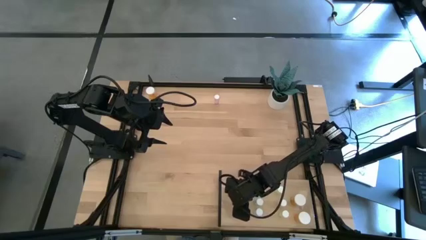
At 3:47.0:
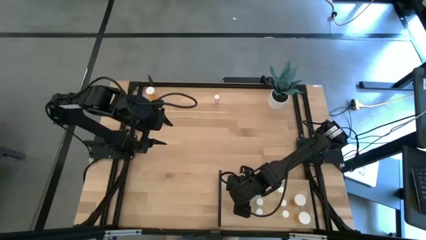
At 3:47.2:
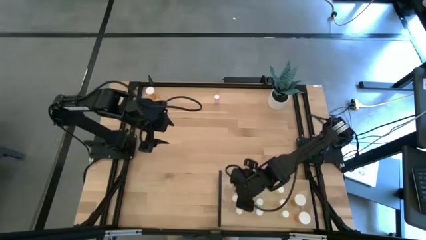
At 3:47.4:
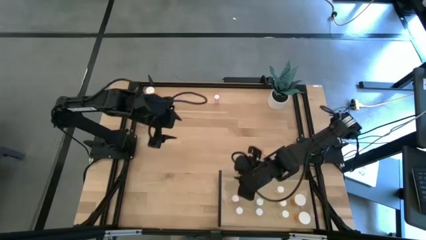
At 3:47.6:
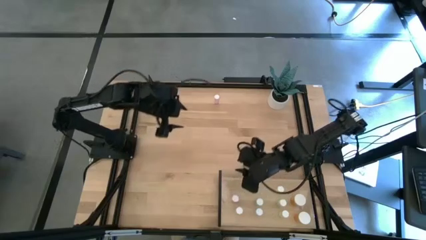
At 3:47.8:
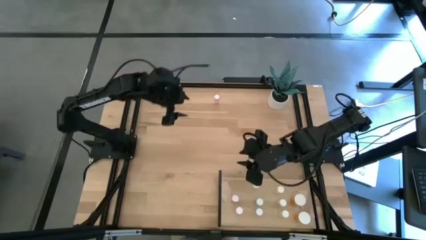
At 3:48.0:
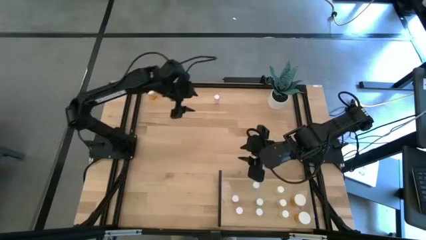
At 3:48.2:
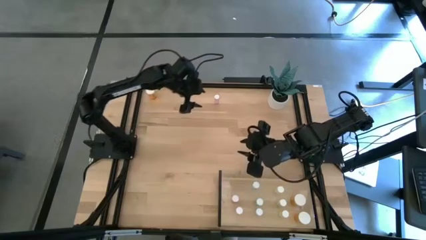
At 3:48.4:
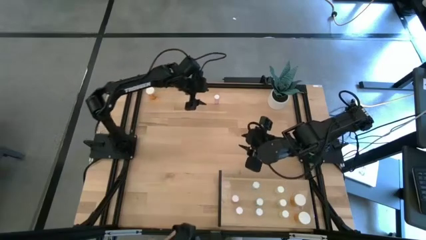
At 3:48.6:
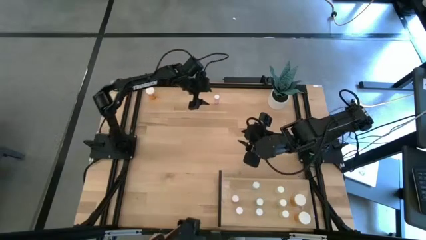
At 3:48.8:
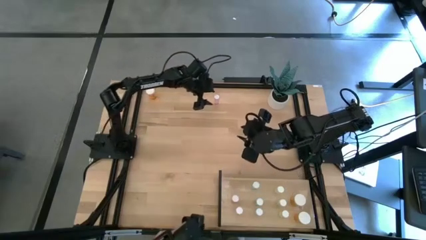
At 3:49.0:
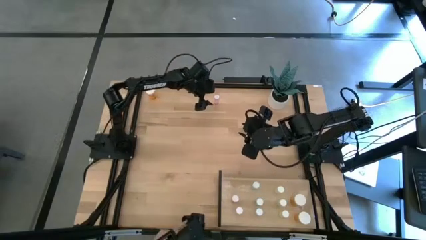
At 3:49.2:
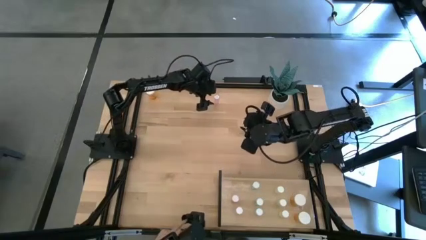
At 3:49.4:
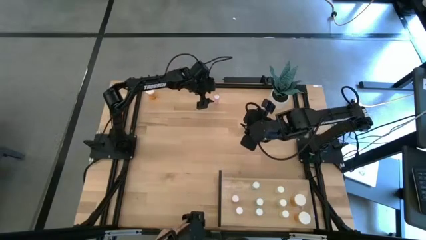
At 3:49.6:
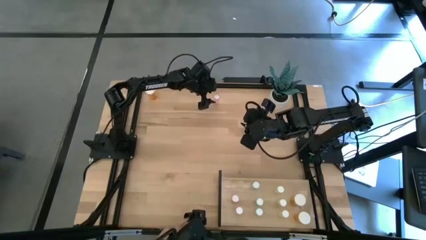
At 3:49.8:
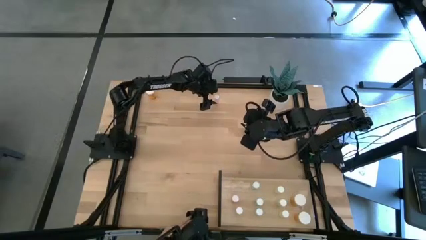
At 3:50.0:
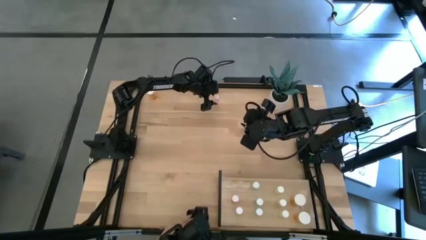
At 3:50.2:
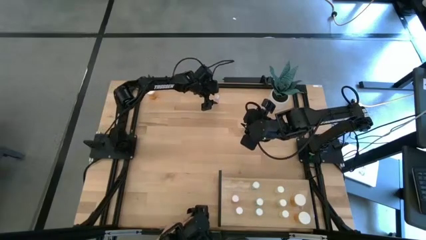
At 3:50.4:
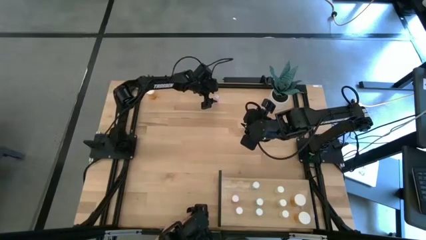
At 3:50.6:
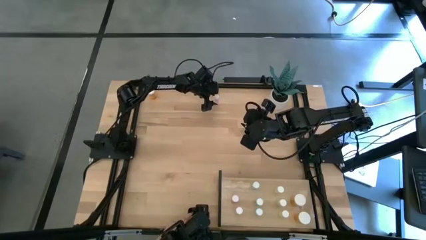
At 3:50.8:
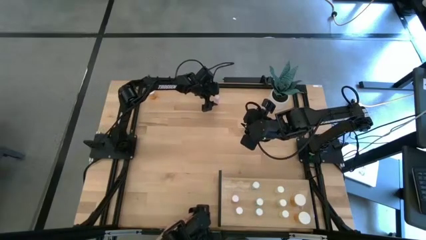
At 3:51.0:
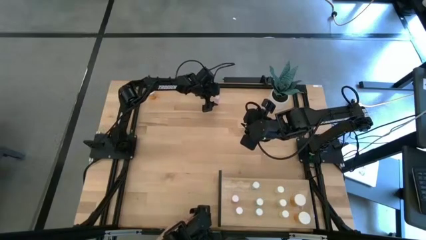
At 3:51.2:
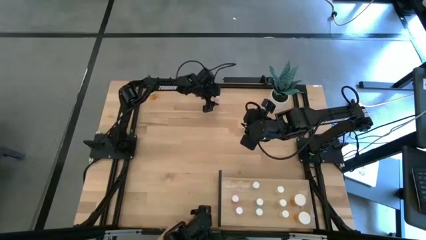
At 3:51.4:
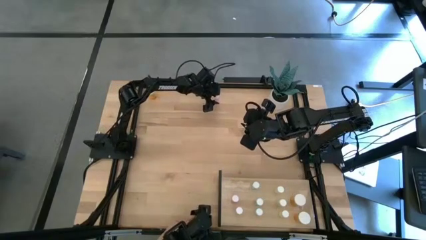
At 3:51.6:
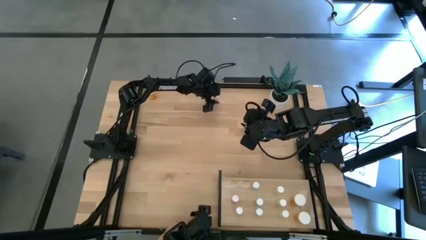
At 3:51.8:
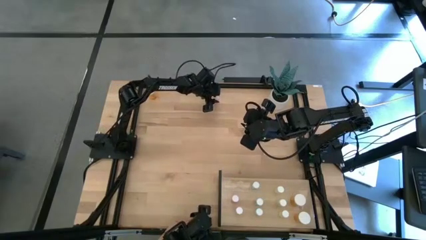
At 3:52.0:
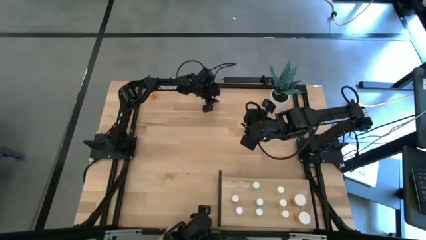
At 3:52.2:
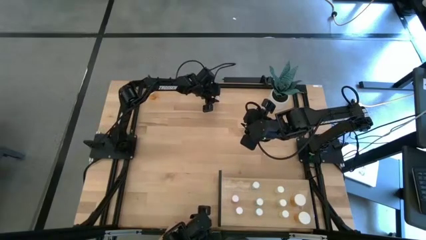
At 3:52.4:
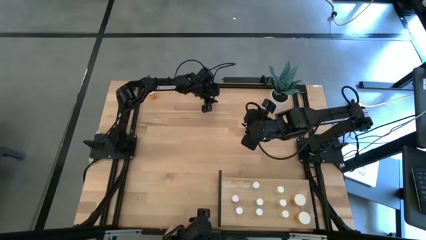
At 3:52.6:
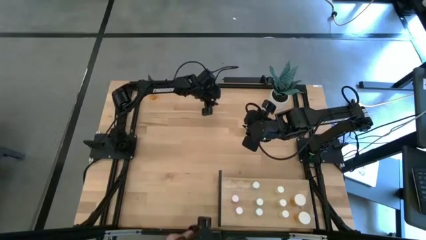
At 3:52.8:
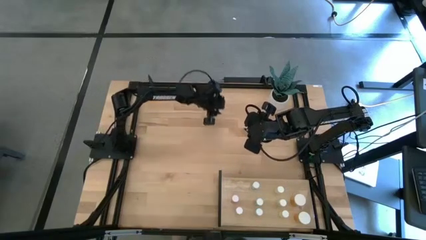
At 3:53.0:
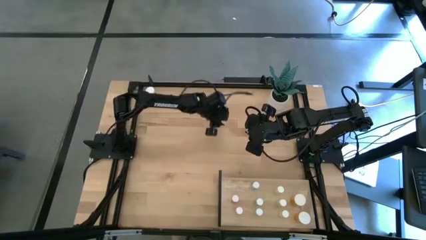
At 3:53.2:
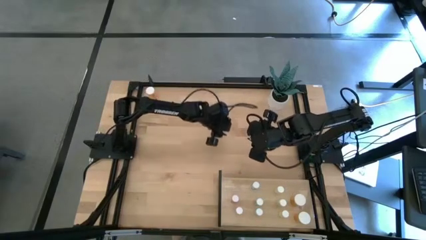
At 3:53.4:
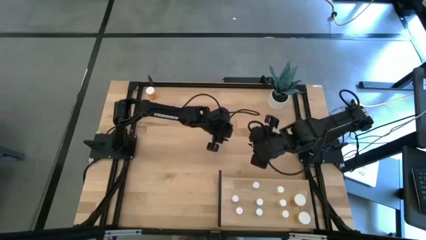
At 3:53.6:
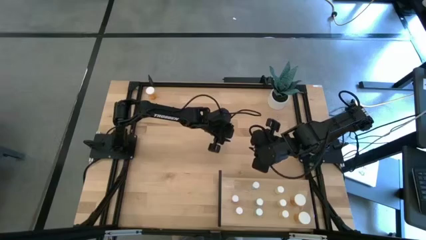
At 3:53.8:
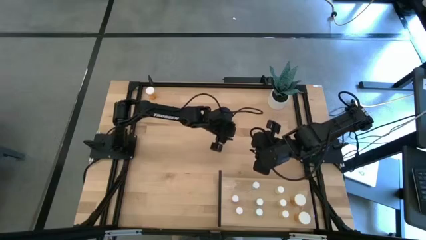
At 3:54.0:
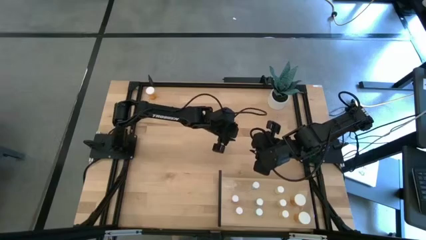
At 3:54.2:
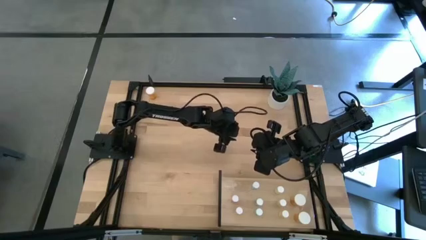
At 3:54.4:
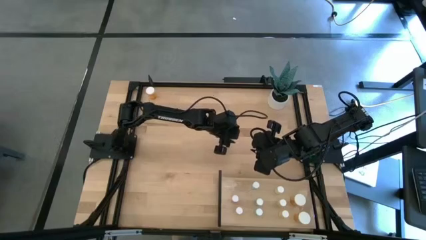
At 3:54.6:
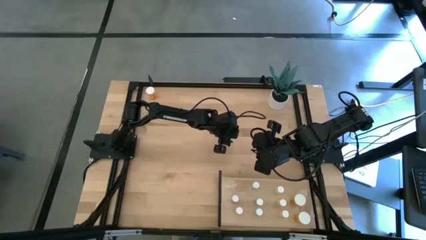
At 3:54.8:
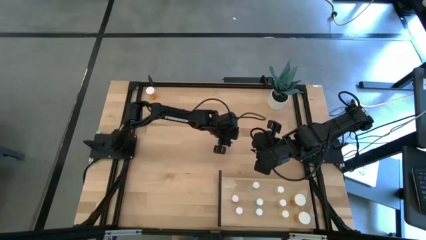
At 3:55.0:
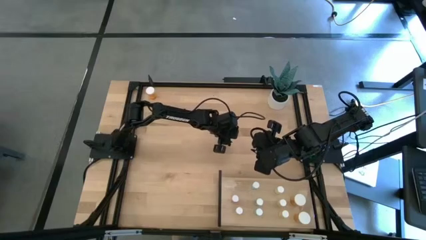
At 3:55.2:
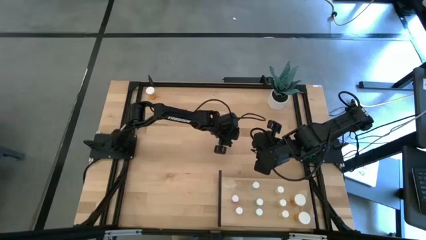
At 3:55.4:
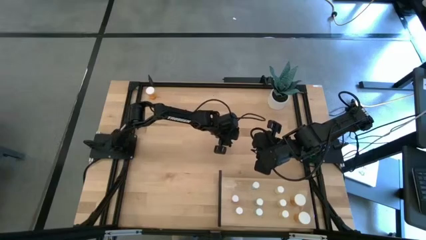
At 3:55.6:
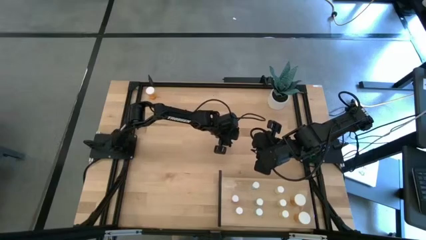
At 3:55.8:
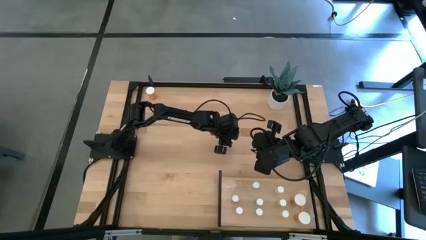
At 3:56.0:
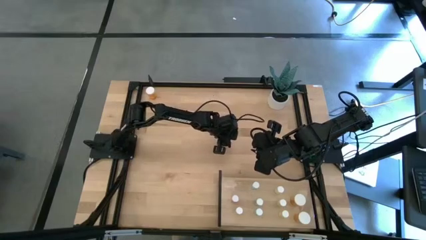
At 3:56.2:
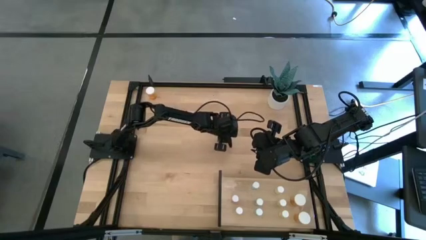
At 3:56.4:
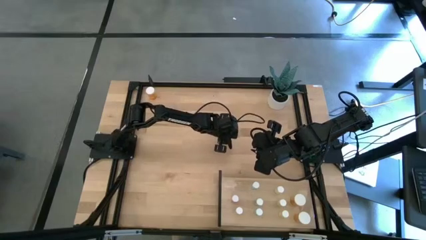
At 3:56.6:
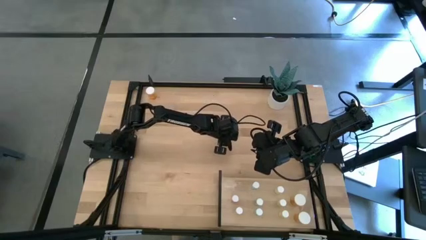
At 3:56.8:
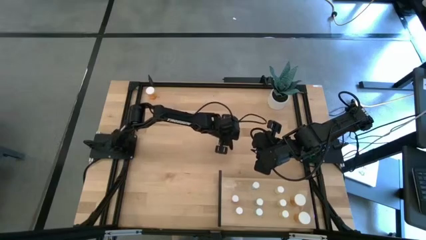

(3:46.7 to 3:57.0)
Task: Pick and place medicine bottles onto shelf by color
Put the pink pill bottle on the shelf aligned with the other pink pill bottle

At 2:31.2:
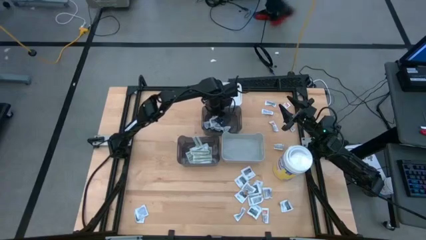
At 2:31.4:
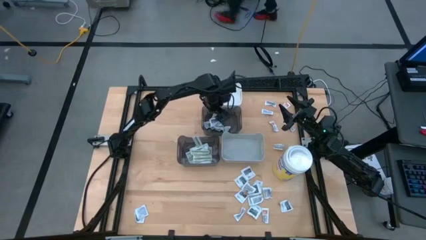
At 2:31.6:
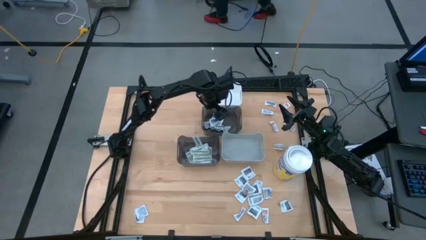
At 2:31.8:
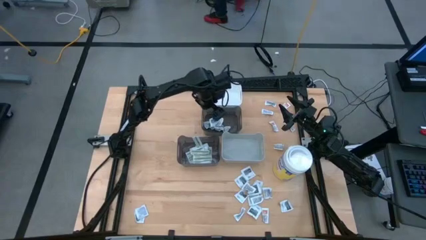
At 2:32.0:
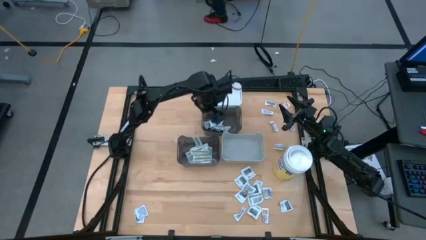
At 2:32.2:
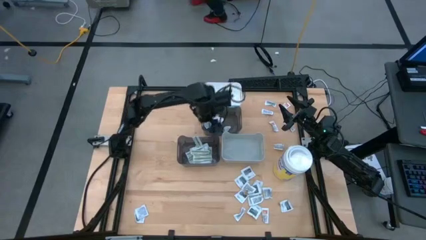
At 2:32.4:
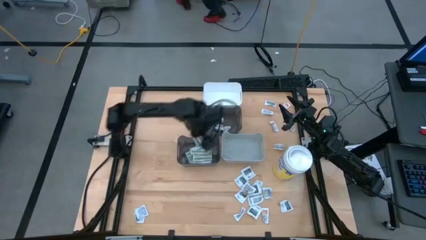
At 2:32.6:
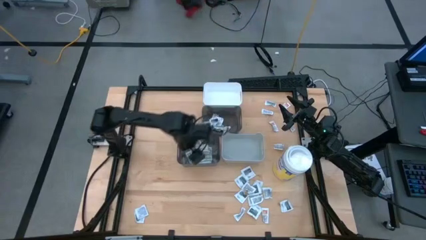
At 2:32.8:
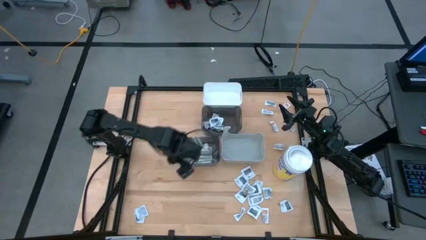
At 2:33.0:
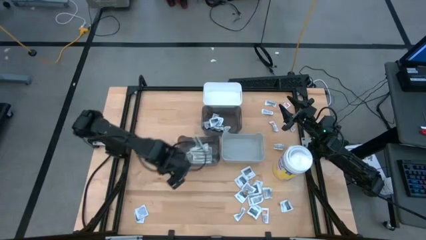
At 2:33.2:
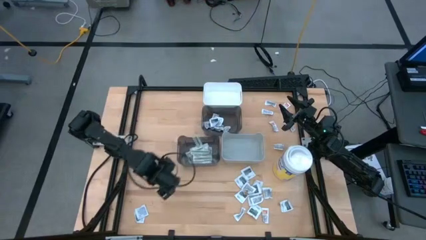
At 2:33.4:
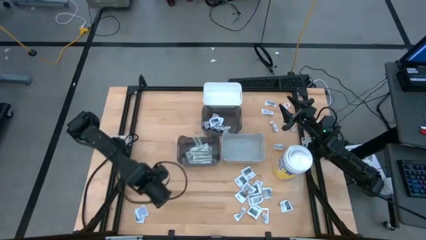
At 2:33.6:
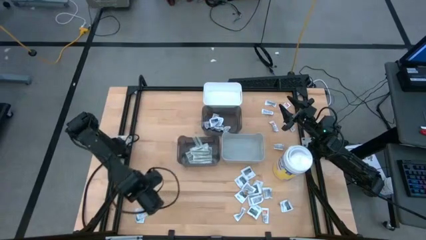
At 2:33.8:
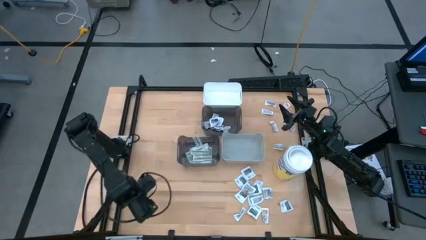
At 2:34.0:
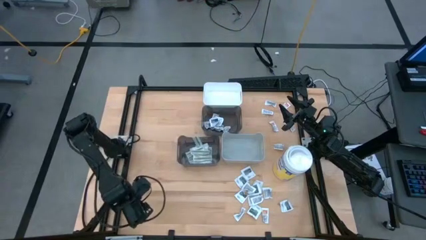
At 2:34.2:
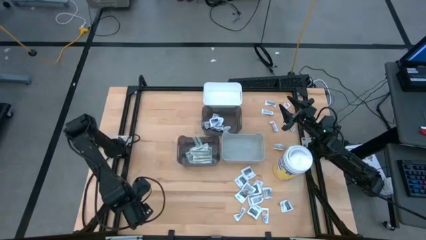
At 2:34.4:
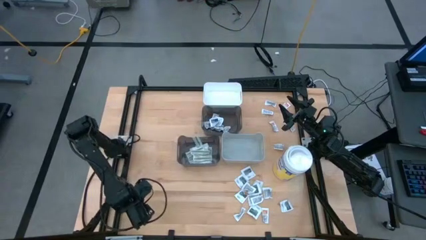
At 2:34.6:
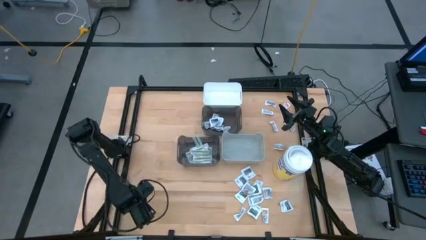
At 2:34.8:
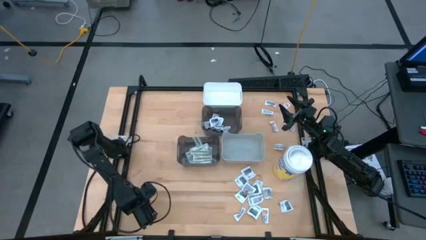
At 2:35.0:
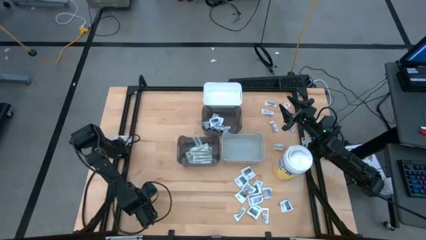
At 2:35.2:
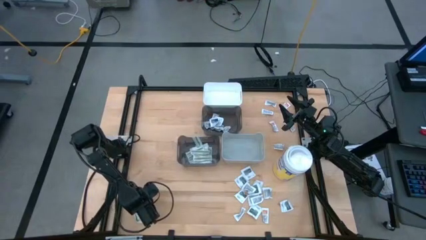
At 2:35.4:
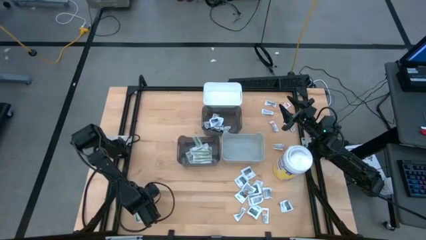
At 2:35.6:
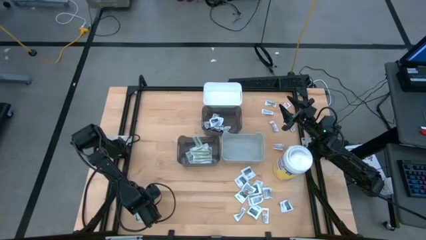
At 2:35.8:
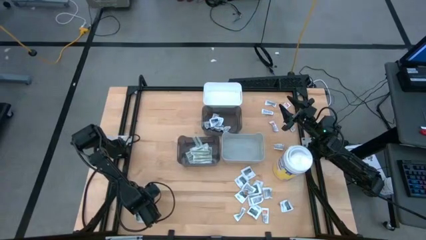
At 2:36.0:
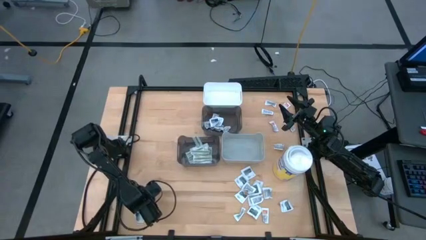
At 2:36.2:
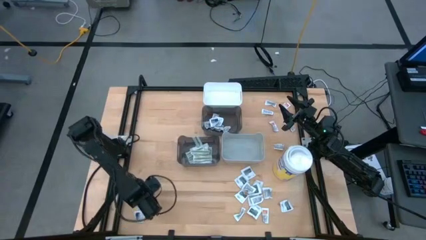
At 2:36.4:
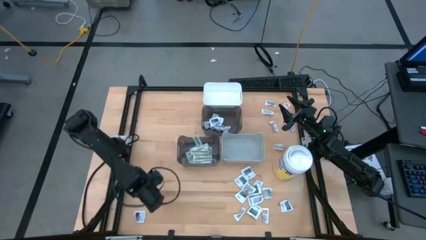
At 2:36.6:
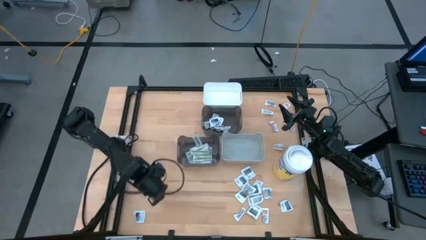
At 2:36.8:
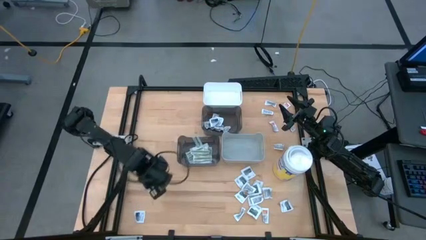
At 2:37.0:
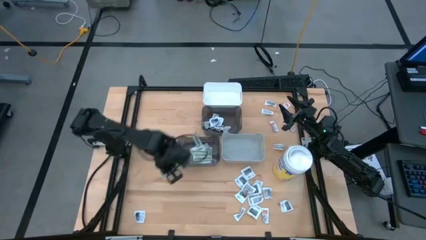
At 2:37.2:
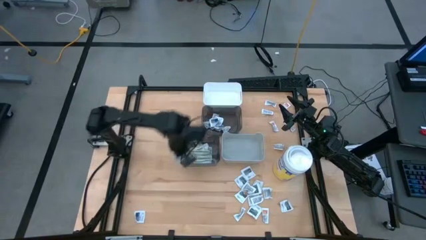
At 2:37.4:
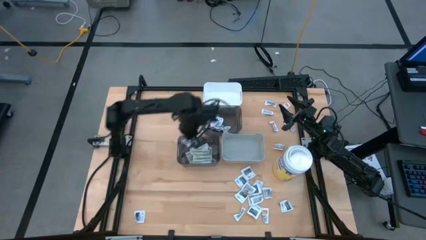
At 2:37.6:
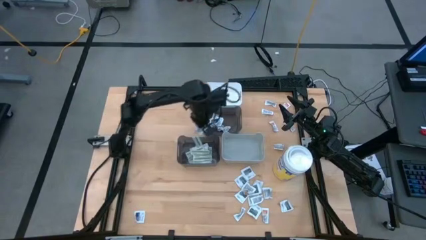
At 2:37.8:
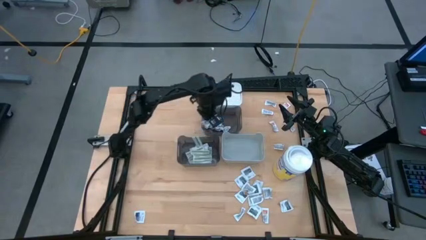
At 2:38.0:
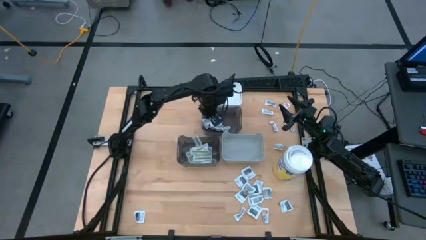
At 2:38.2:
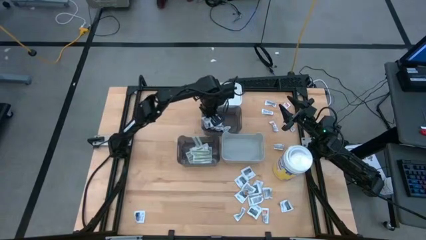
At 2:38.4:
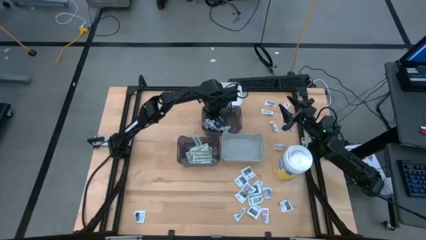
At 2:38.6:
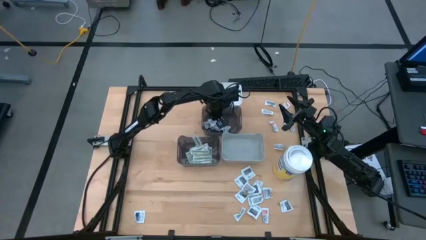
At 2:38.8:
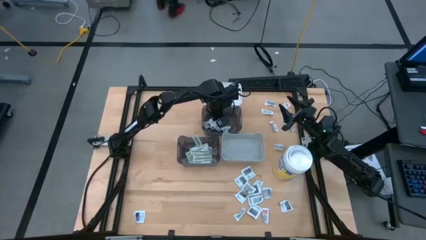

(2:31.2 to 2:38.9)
Task: Pick & Place First Aid Supplies
Put the white alcohol pad into the top black bin
